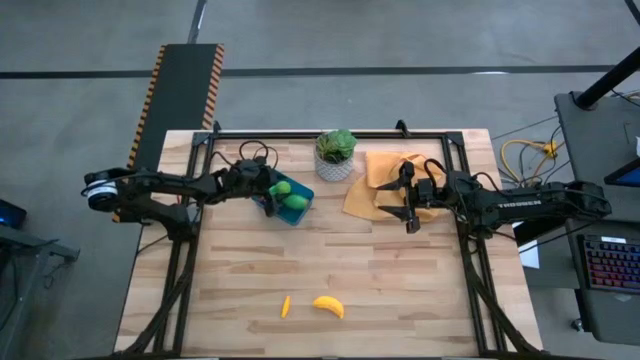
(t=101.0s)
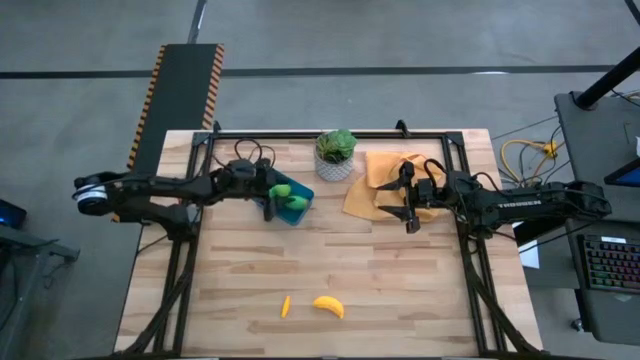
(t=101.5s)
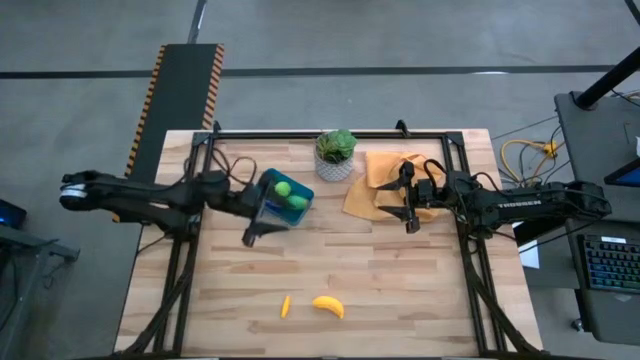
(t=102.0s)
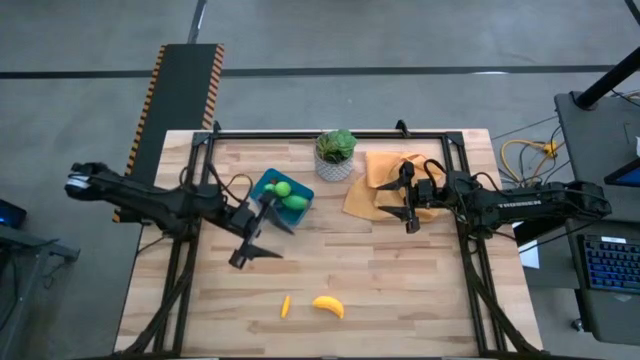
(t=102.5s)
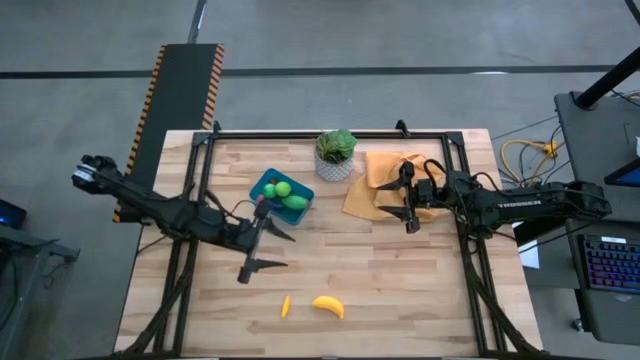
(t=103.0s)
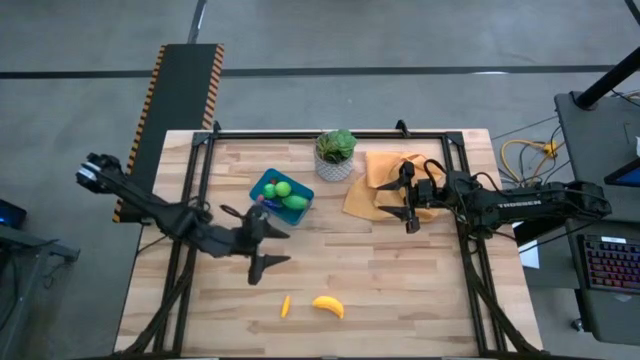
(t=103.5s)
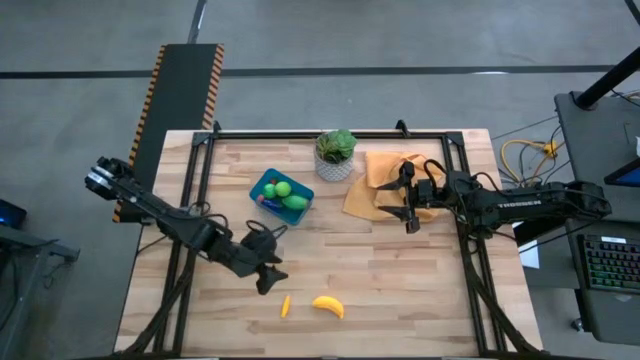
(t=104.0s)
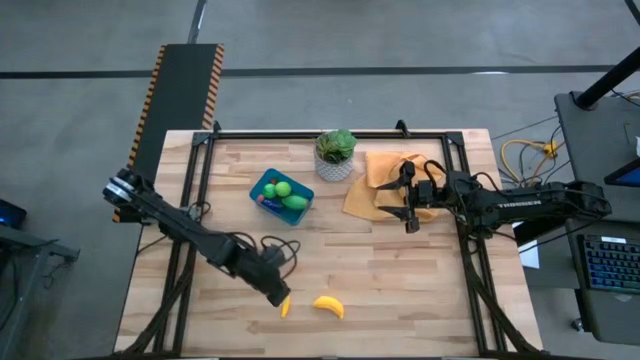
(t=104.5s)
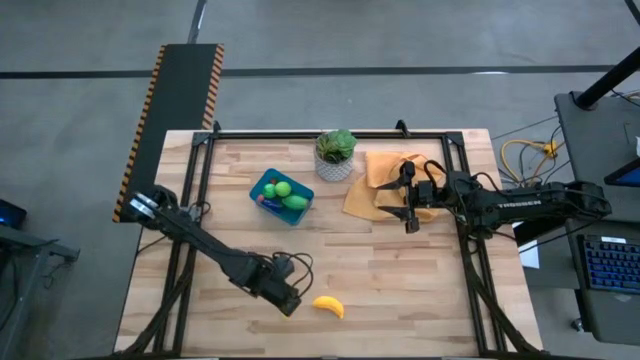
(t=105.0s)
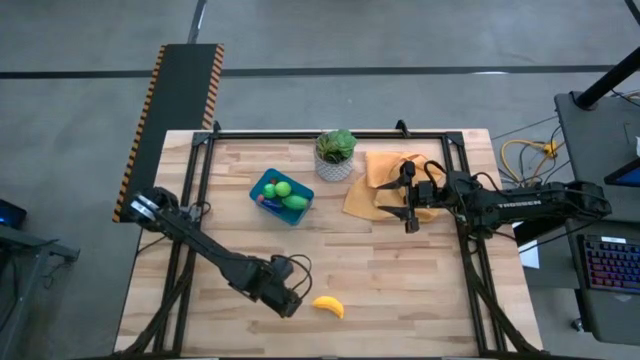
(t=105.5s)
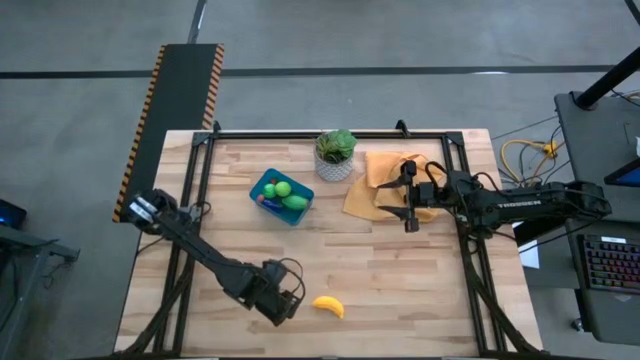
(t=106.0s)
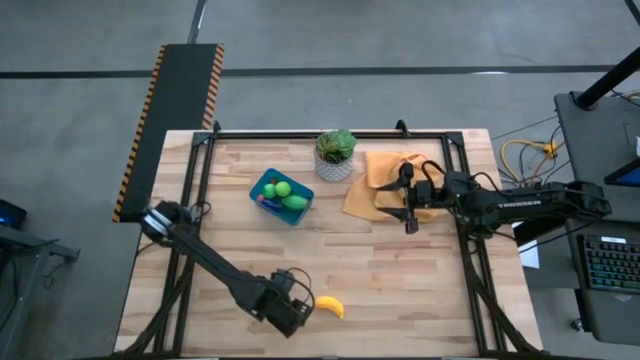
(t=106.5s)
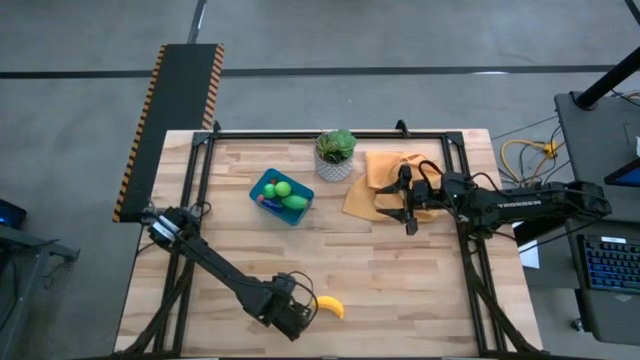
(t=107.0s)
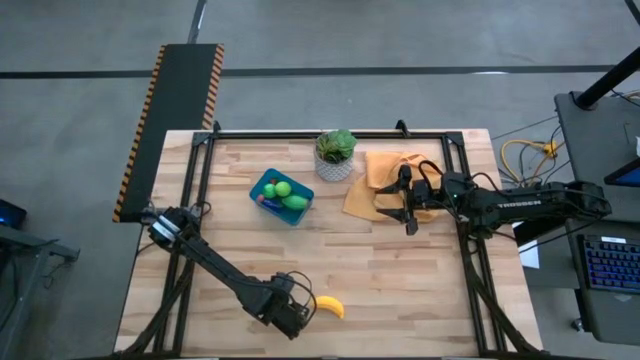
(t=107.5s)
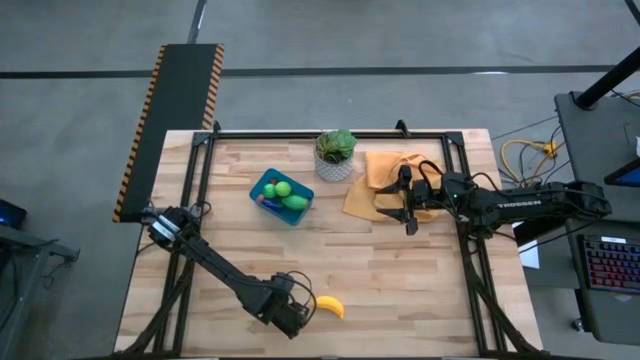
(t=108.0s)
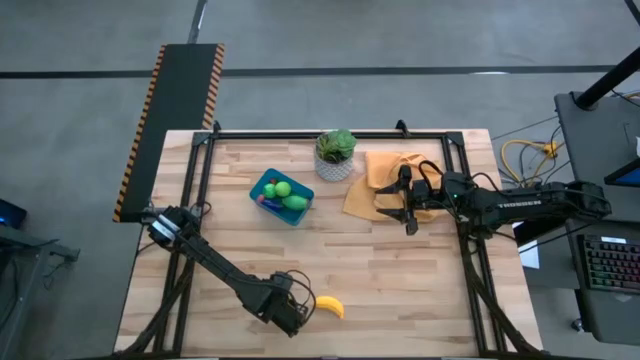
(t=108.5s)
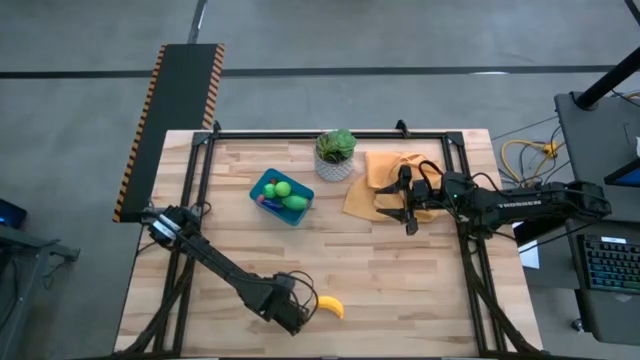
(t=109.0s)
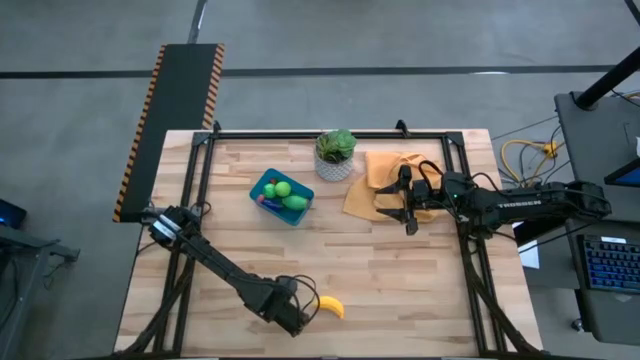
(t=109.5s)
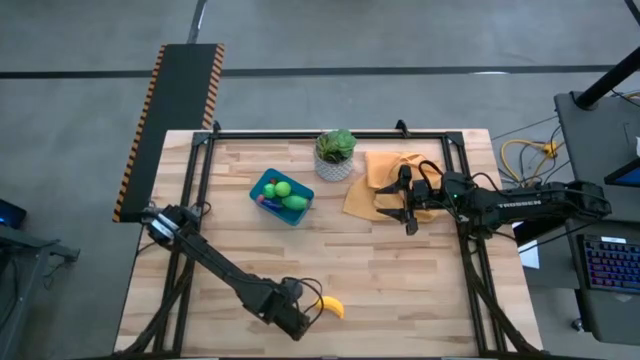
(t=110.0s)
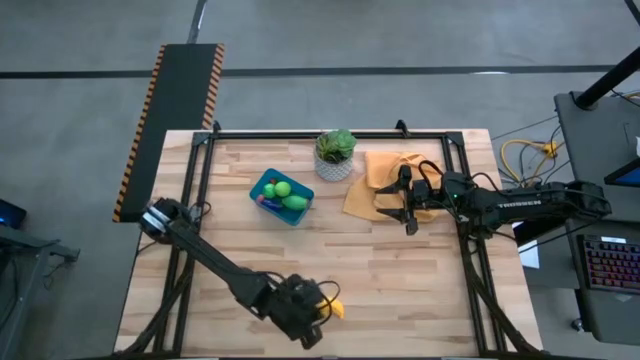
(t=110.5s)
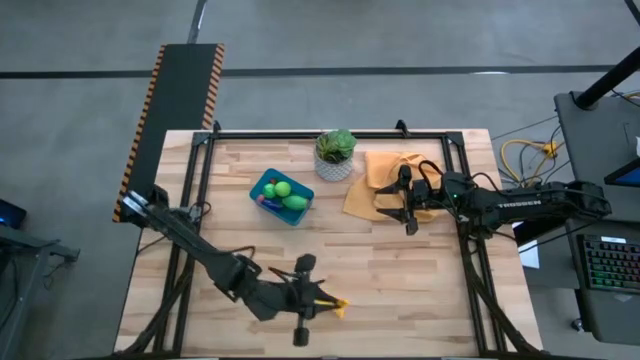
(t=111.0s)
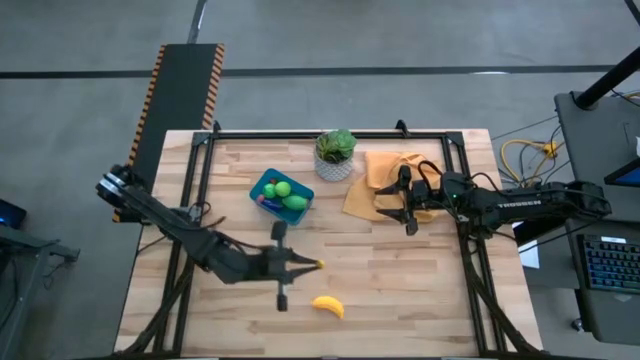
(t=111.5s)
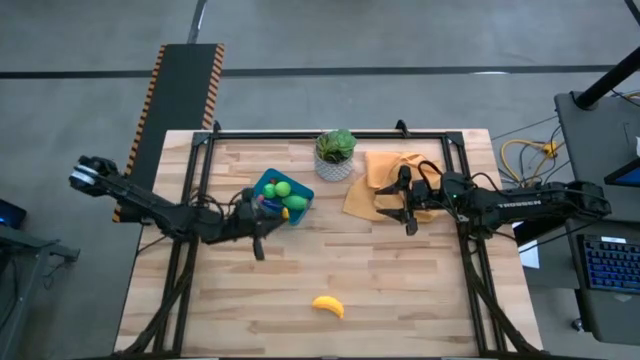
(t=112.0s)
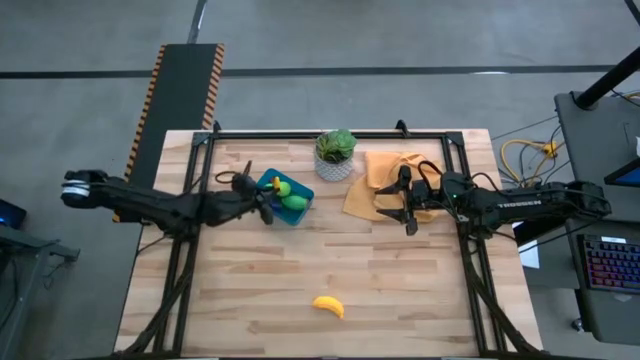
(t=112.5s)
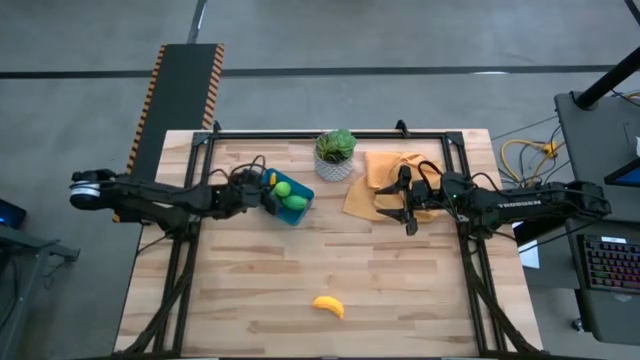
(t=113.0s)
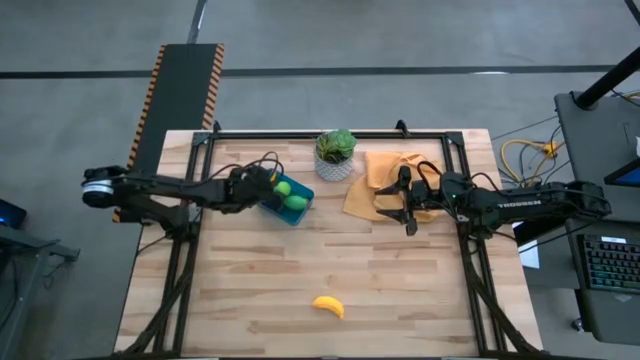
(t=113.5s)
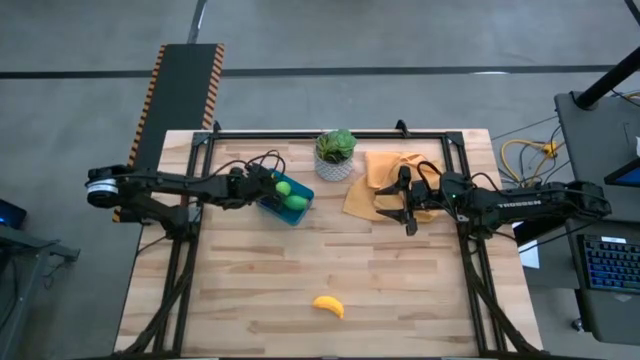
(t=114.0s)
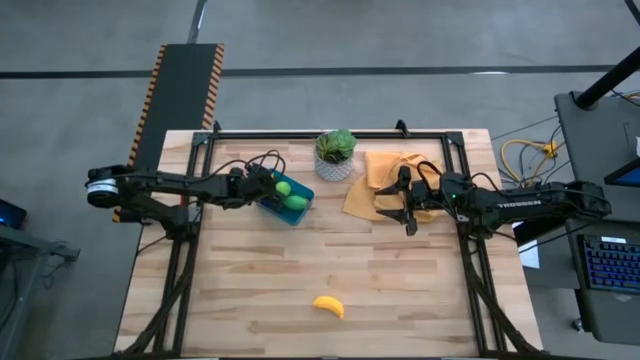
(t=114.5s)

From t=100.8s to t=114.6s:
Task: Pick and placing Produce into tupperware
Put the yellow corn into the blue bin

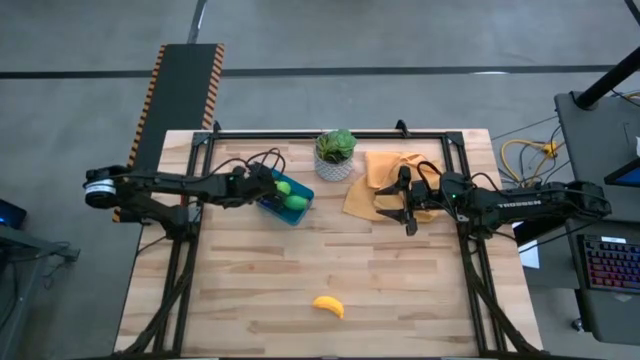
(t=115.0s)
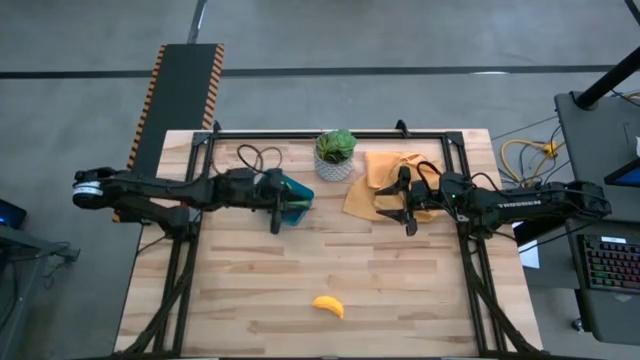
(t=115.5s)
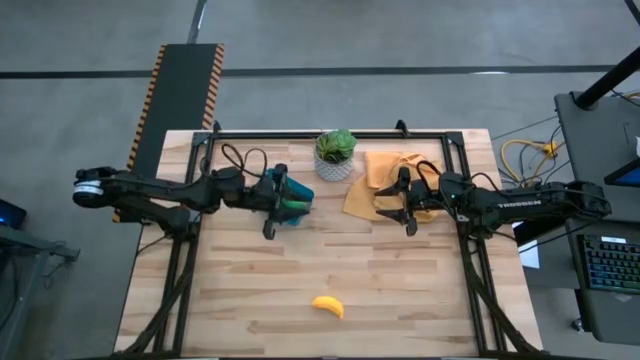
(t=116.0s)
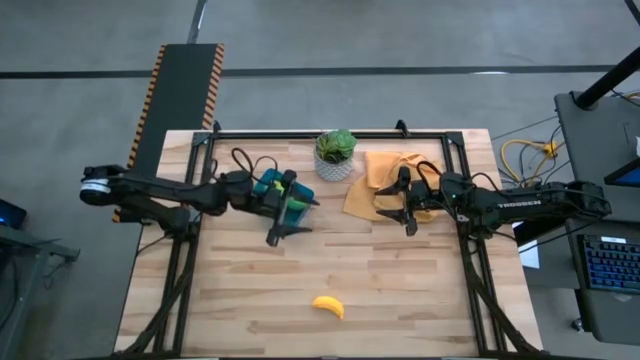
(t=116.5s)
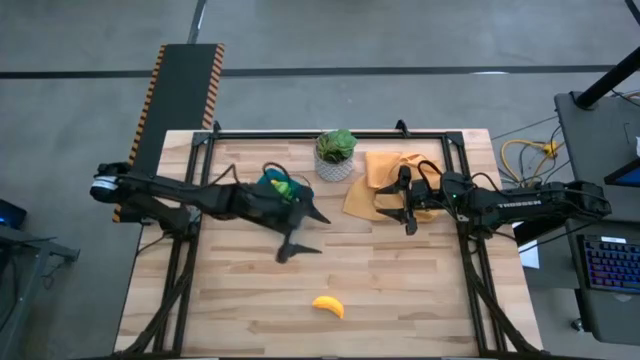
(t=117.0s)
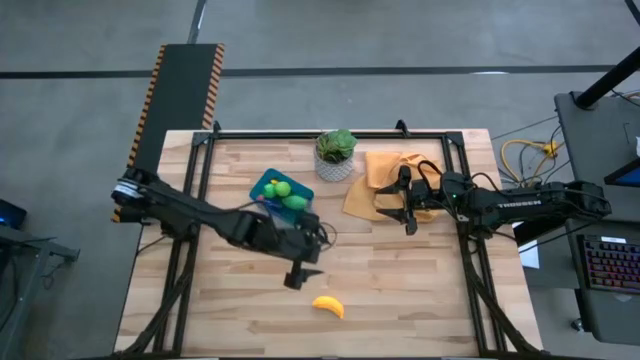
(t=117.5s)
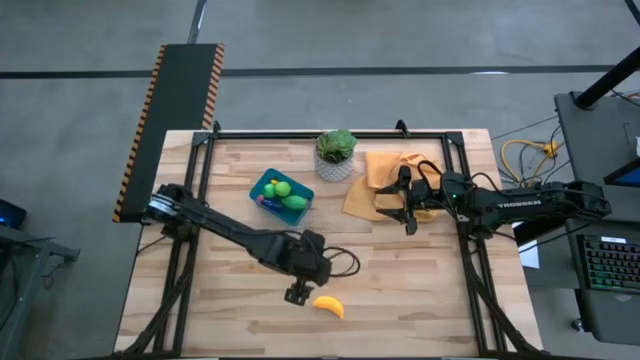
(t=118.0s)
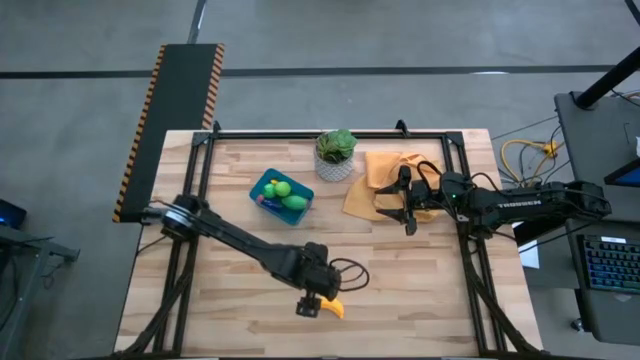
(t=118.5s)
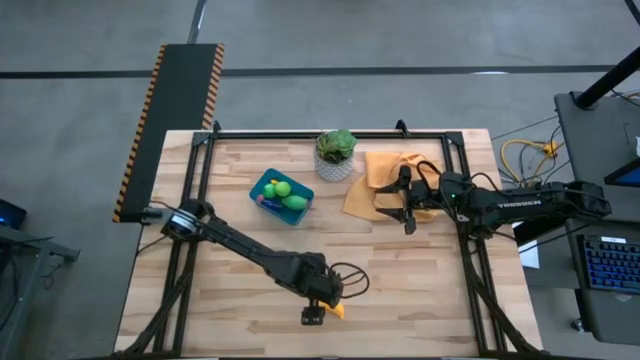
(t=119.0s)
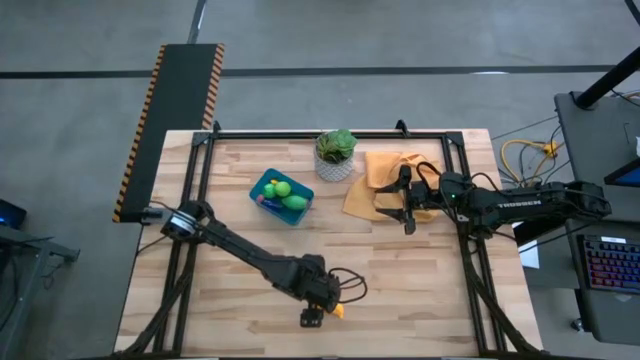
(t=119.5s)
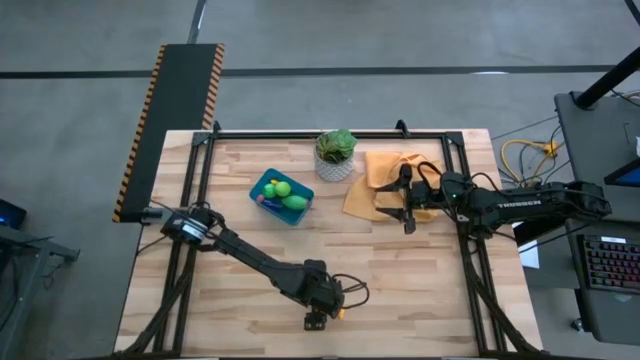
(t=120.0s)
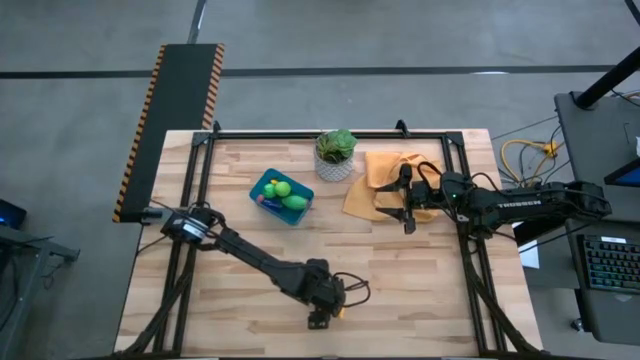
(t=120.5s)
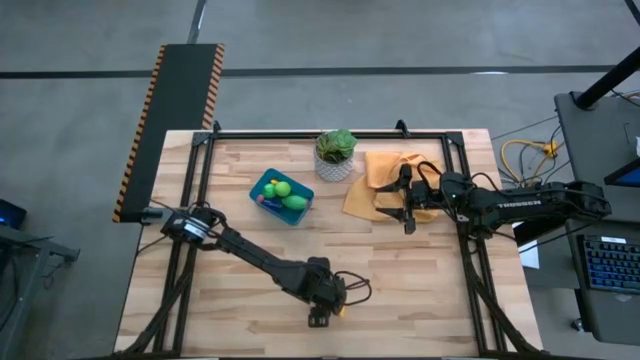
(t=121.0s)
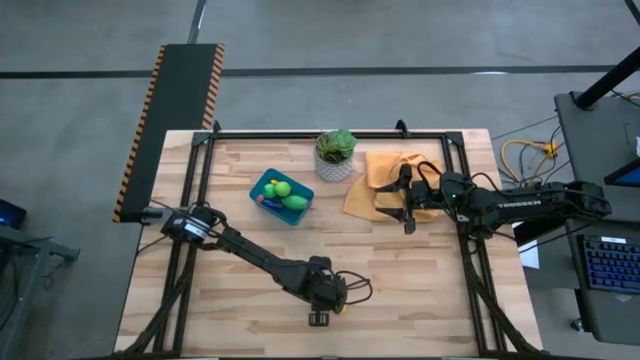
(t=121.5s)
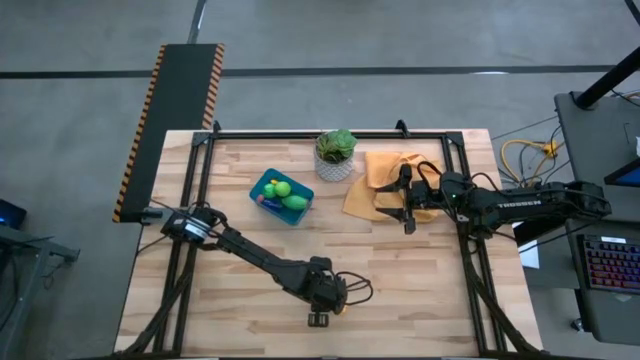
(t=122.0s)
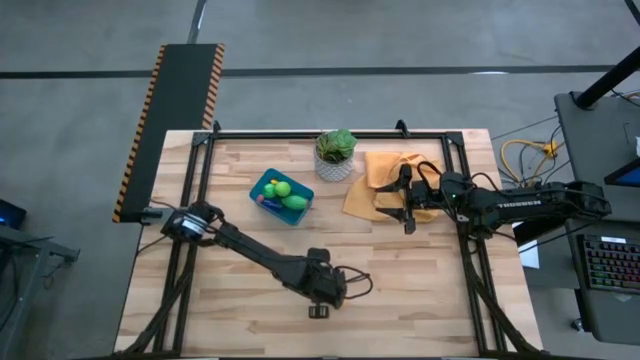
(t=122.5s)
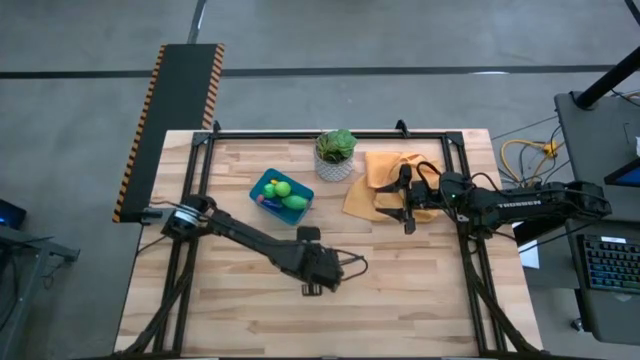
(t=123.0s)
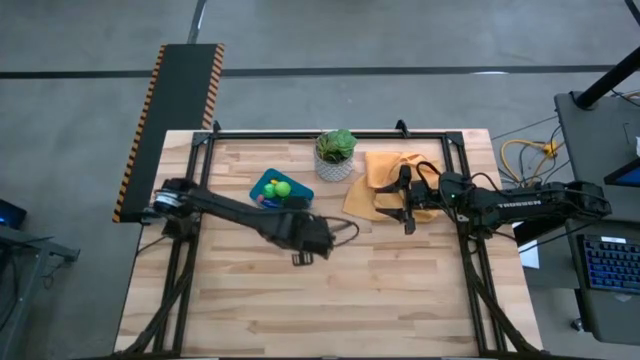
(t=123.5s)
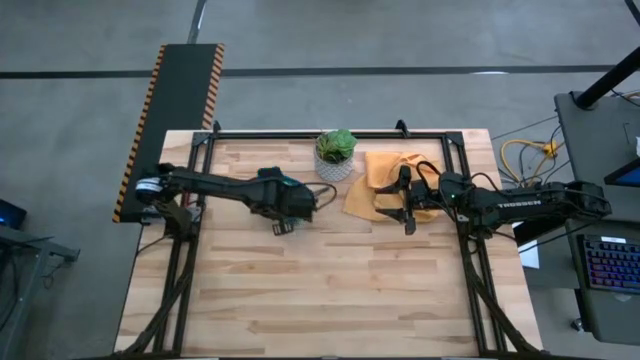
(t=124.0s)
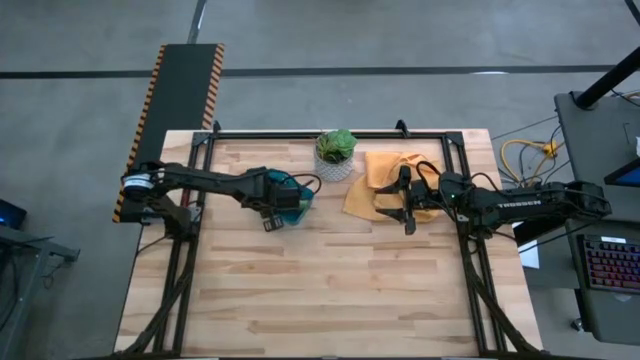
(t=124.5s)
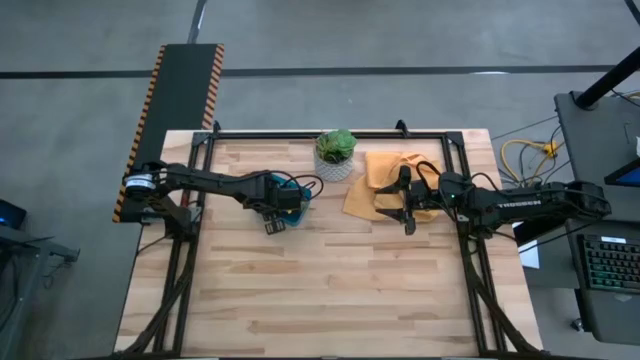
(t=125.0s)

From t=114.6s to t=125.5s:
Put the yellow banana into the blue bin
